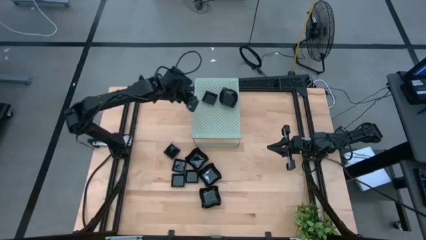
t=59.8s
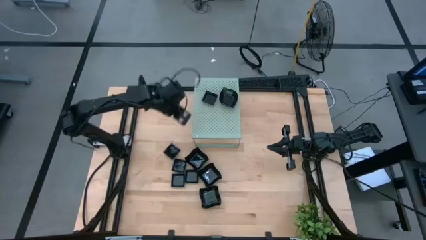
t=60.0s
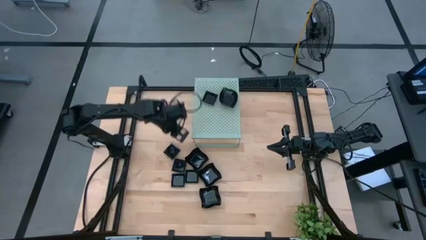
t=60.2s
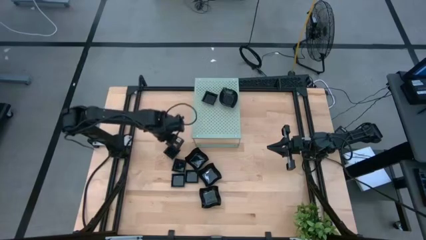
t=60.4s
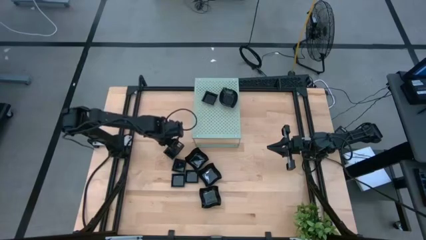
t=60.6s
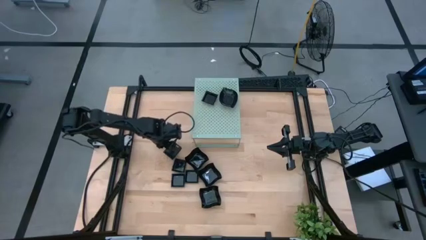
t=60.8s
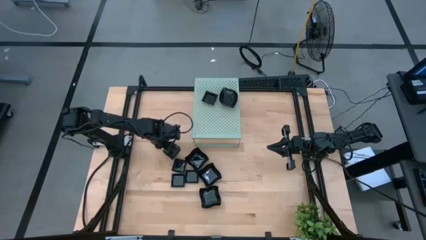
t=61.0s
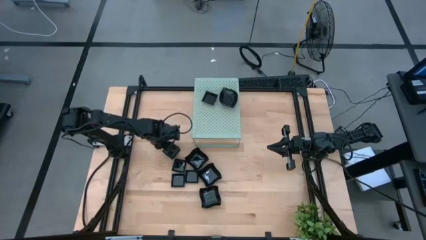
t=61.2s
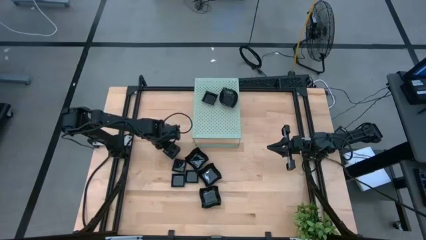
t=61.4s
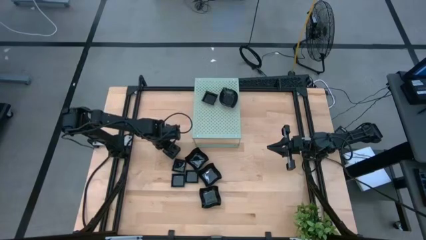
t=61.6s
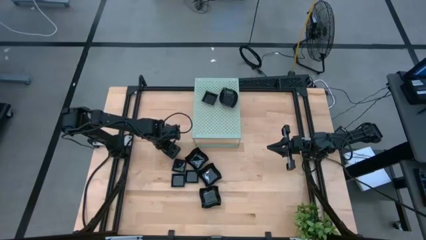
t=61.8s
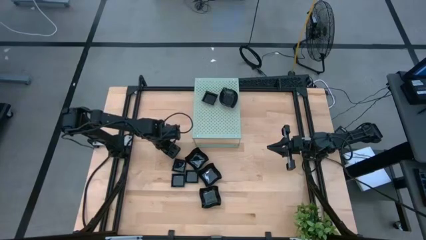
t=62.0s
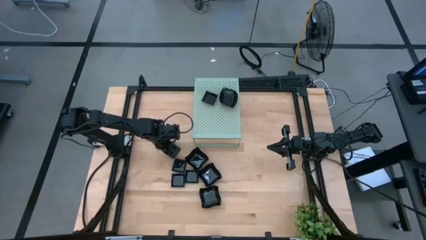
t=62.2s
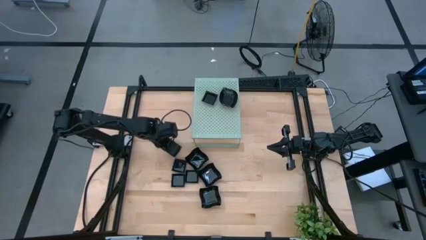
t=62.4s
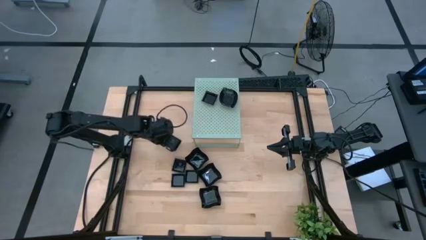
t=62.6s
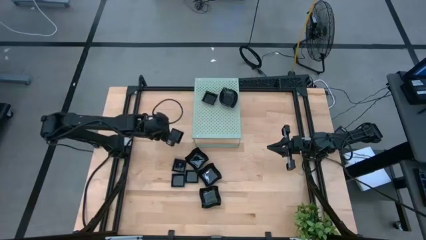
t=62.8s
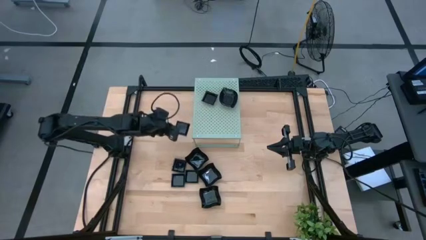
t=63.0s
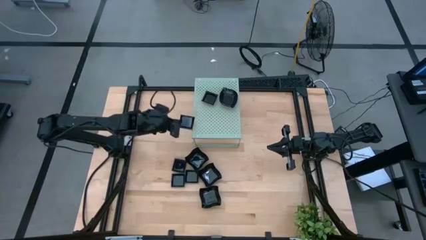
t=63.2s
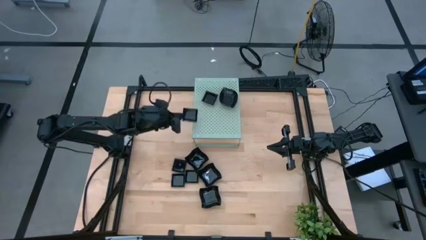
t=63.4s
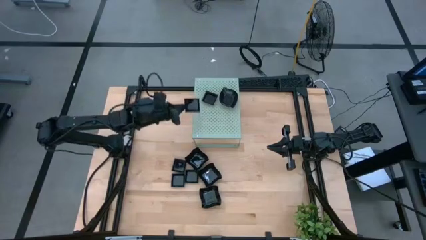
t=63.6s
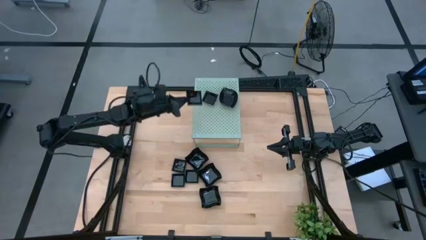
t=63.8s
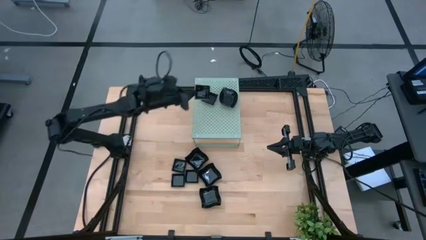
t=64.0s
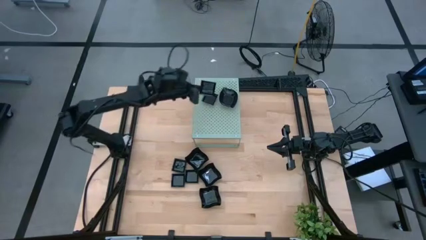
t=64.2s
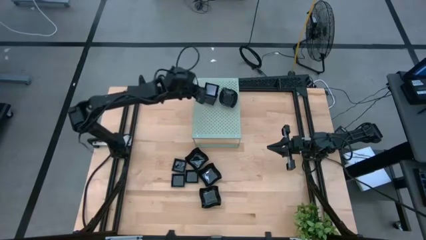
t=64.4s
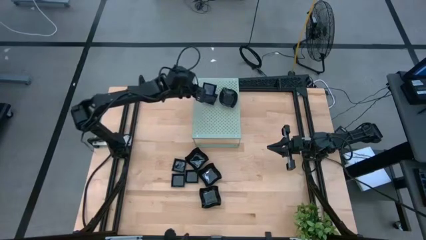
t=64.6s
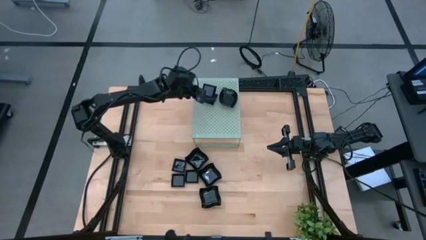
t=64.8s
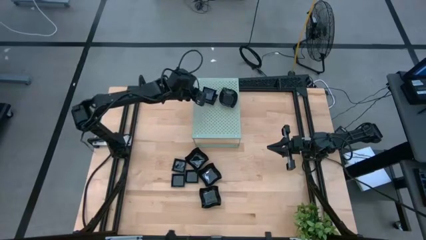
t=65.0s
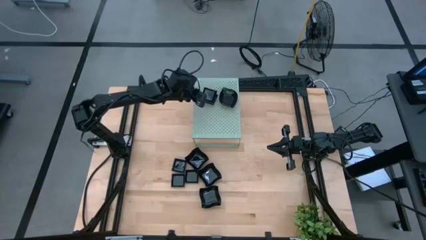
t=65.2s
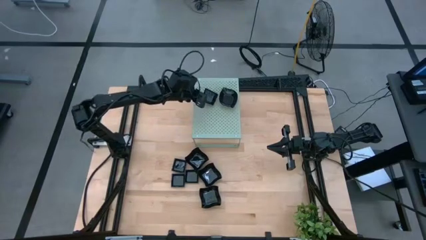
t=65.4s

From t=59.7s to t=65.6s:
Task: Pick & Place Mini shaped plates
Stack the black square plate on top of the other square plate on the shelf

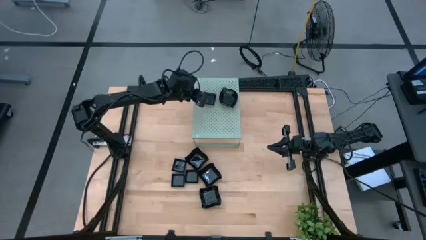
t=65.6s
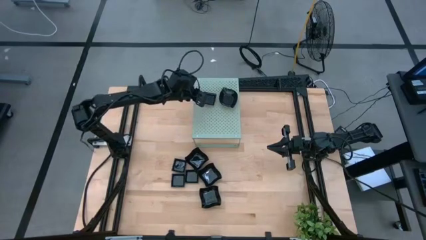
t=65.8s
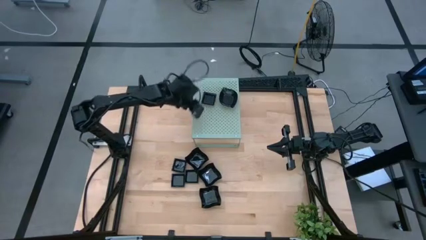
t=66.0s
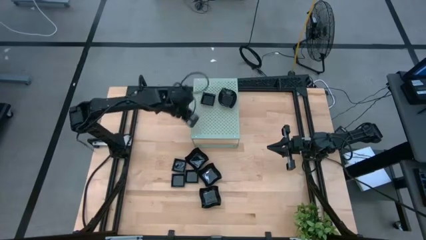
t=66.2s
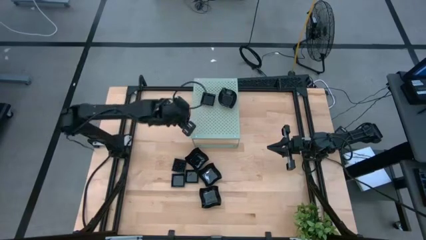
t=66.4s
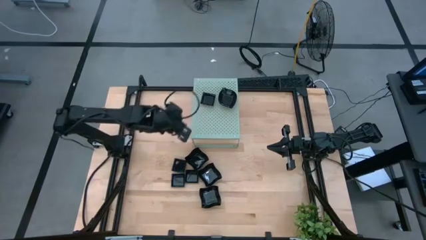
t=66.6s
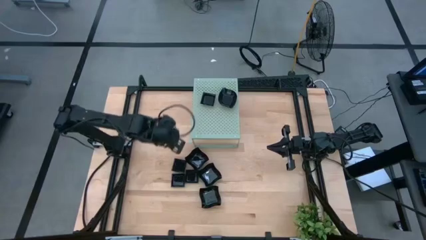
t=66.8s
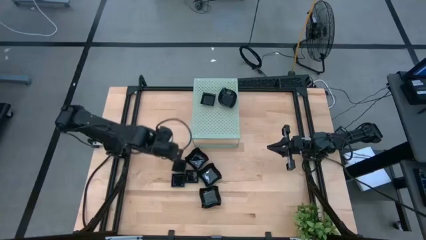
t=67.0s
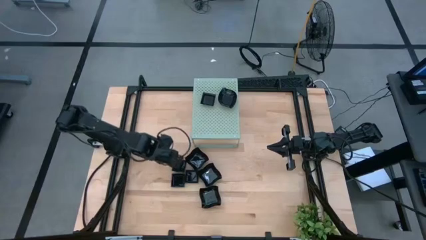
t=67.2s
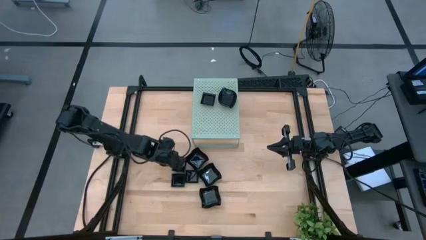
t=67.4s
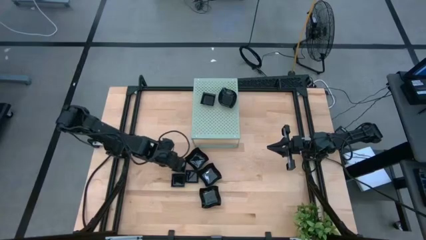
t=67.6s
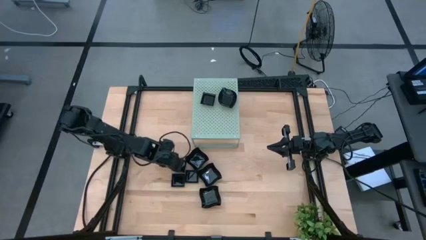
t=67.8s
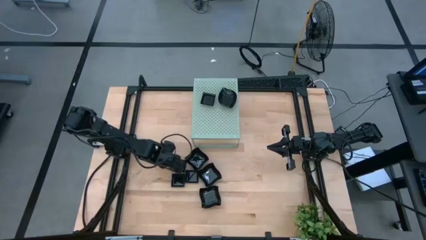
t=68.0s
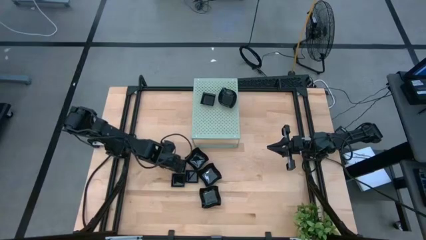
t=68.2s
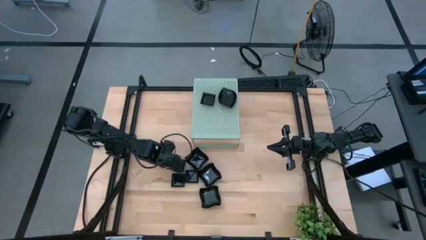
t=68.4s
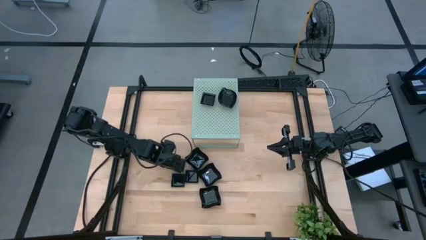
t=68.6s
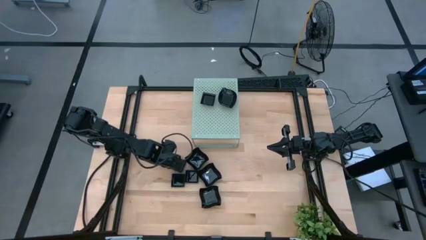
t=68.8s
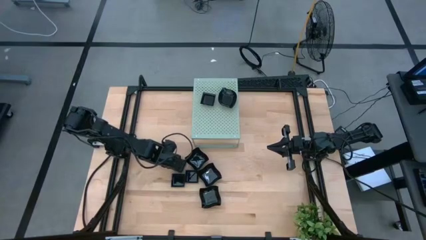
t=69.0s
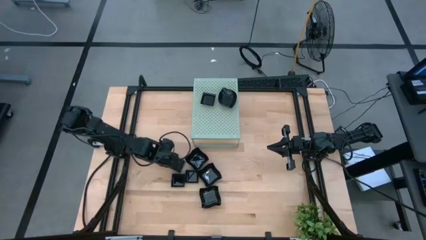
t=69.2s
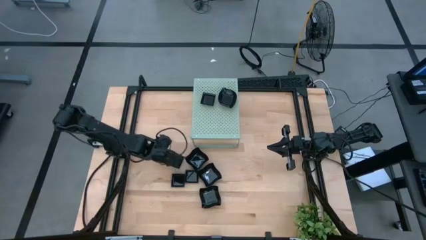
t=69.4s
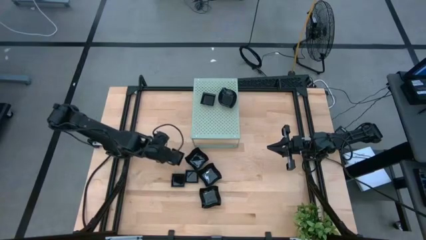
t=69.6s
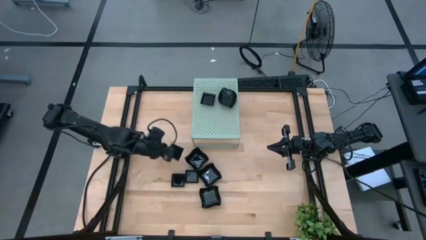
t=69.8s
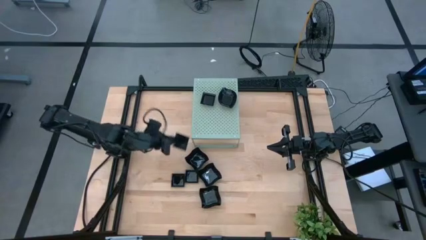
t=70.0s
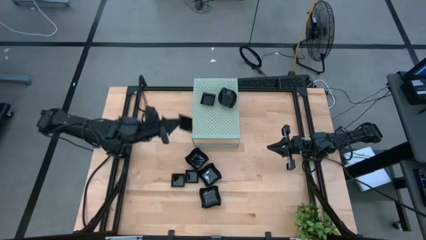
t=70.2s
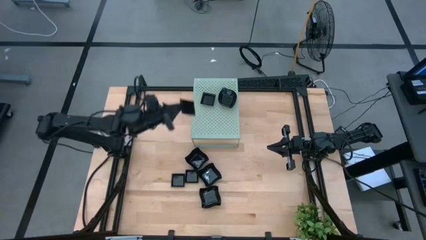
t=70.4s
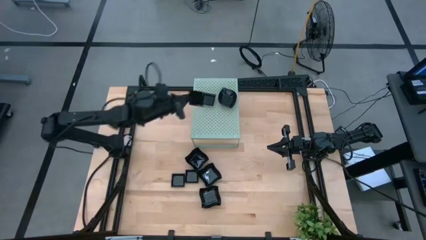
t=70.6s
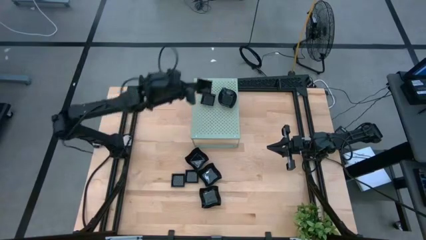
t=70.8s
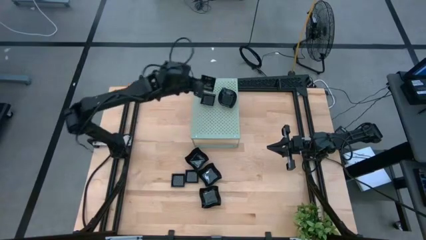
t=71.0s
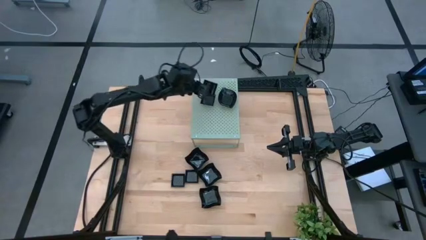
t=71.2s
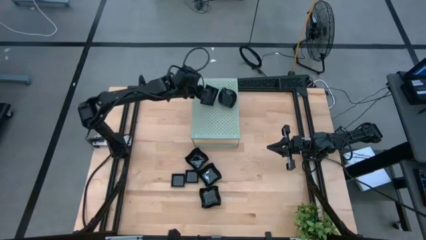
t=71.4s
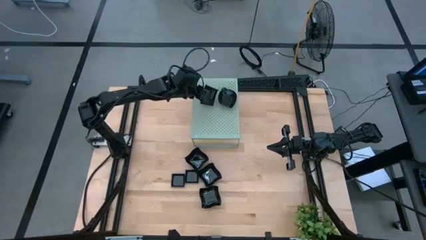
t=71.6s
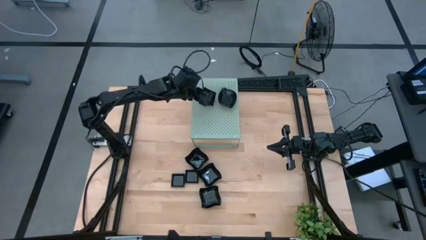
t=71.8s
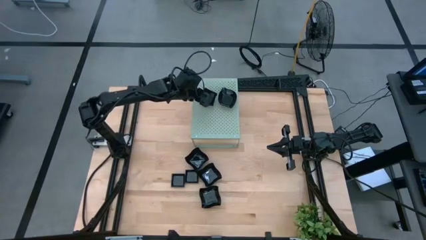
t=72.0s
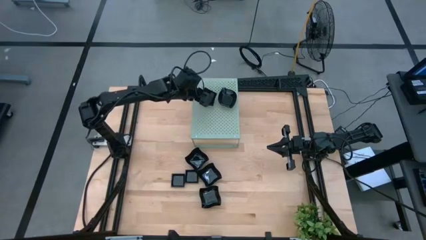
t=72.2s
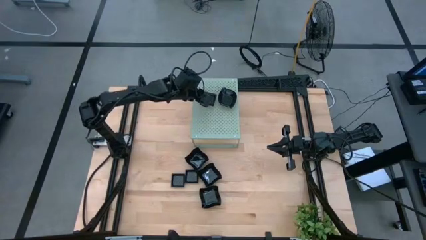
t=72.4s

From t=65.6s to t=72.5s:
Stack the black square plate on top of the other square plate on the shelf

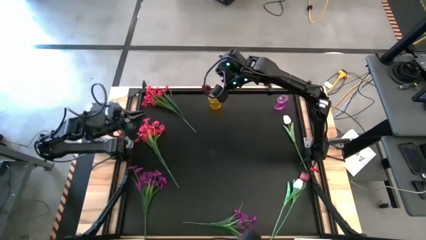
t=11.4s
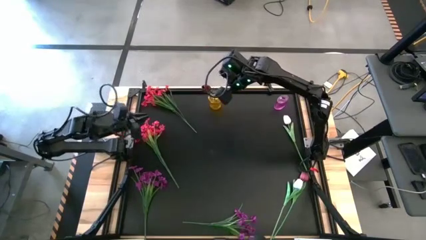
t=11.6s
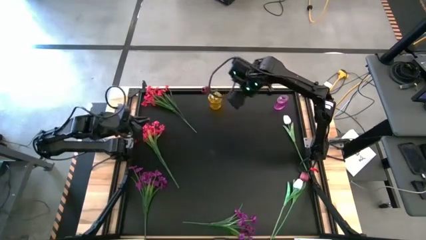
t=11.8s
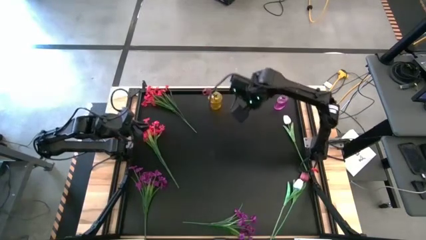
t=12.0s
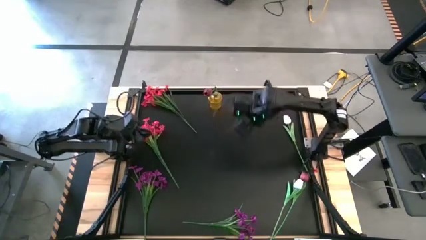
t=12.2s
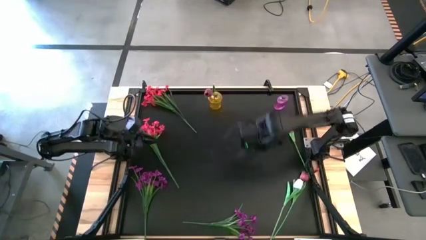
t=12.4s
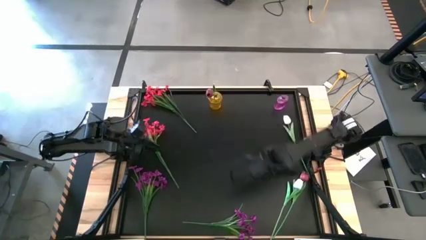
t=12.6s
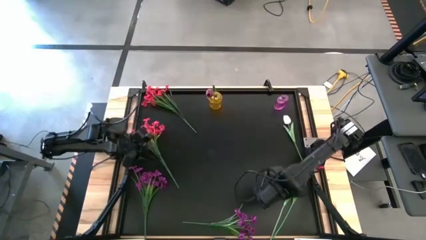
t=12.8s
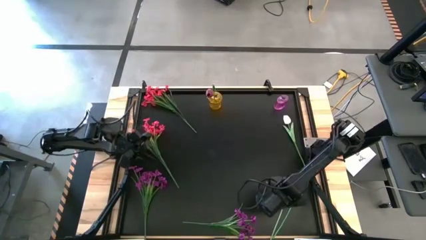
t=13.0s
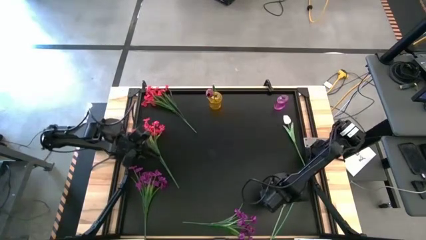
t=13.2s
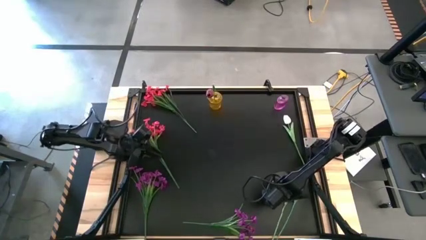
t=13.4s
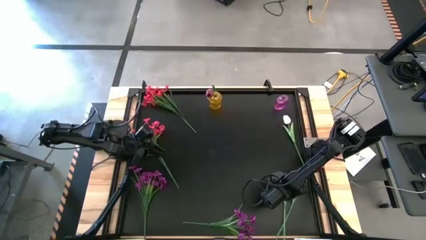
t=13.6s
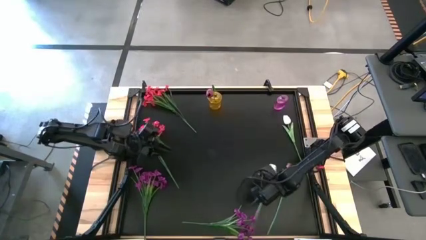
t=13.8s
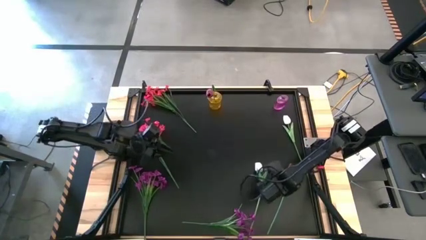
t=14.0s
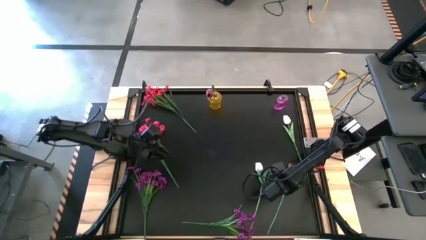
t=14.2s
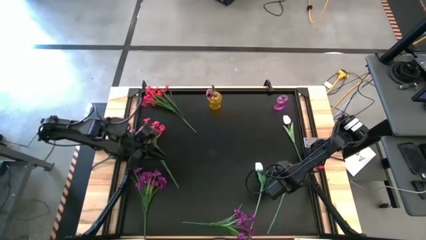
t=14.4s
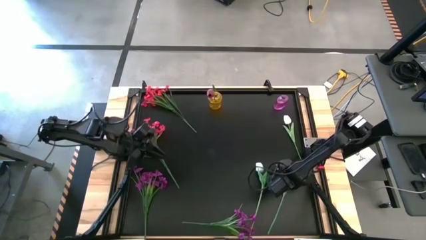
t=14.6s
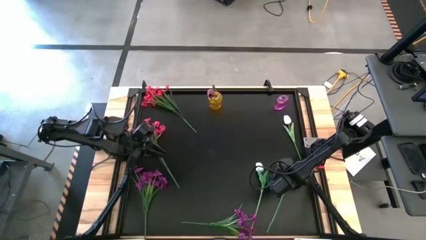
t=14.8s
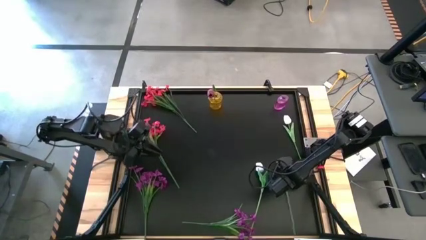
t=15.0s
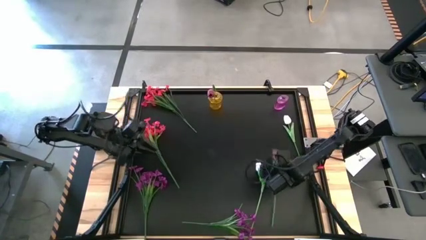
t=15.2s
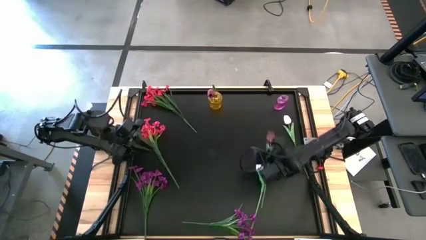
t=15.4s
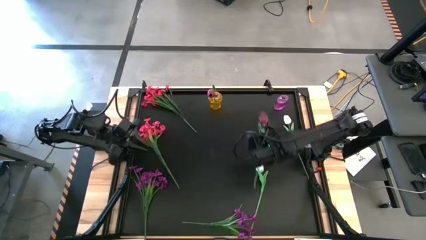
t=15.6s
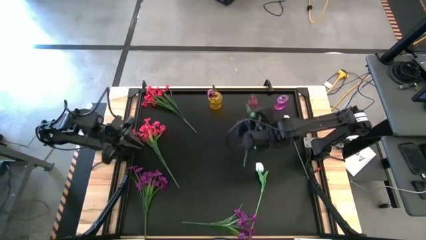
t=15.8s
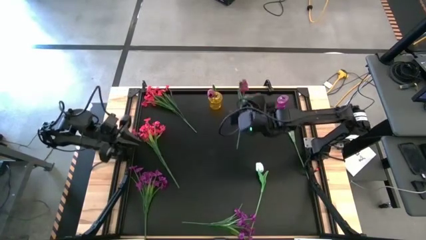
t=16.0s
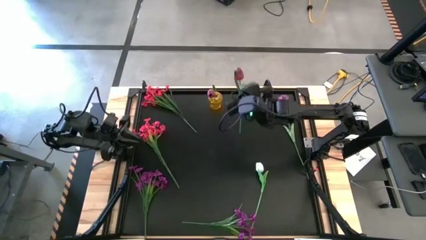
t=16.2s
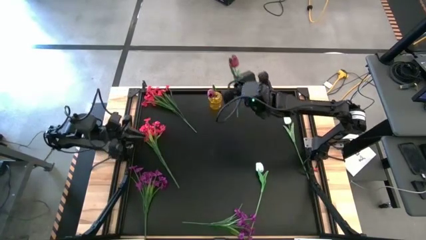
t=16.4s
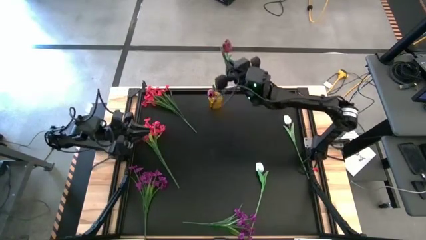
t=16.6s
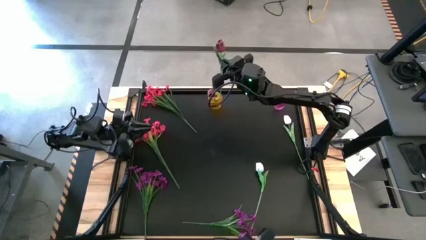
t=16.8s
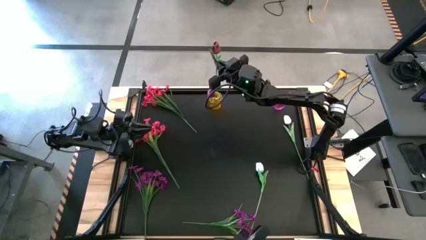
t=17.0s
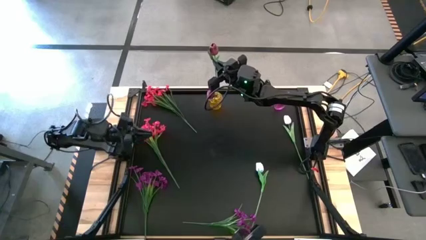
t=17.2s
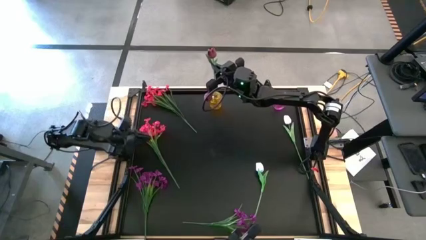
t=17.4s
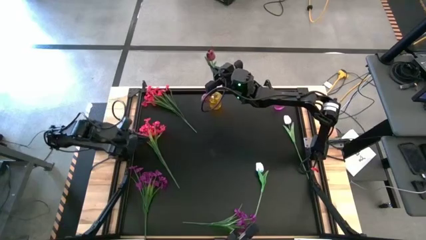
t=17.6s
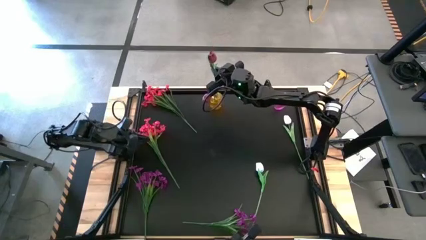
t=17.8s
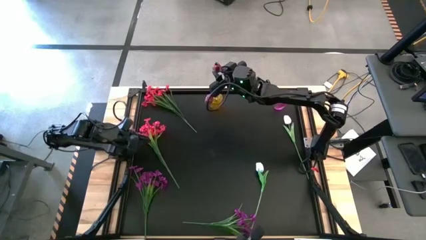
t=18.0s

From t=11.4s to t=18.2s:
Task: Sort flowers into vase by color
Put the pink tulip into the yellow flower vase
